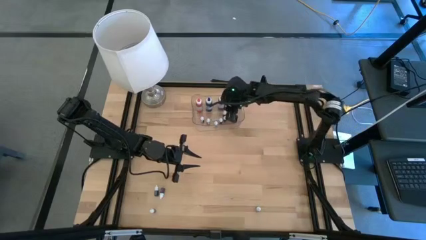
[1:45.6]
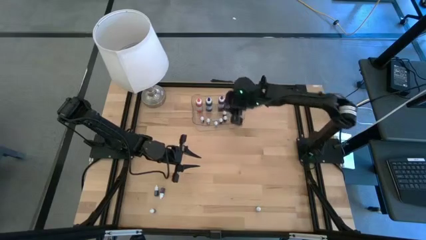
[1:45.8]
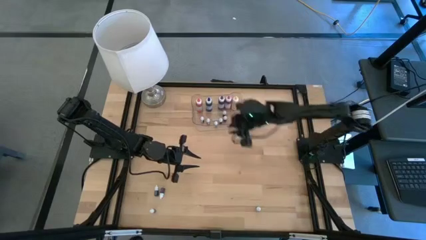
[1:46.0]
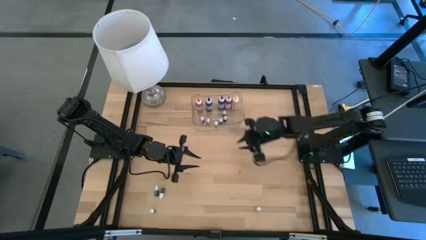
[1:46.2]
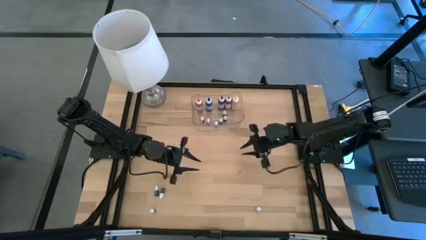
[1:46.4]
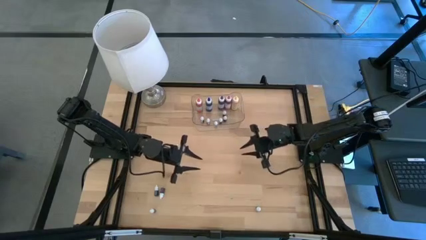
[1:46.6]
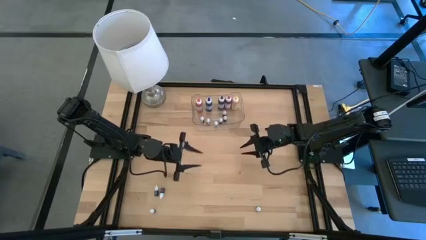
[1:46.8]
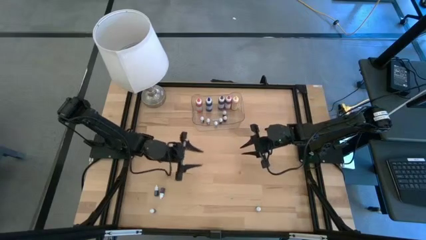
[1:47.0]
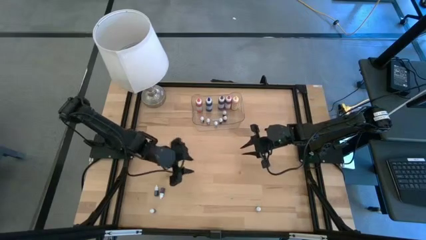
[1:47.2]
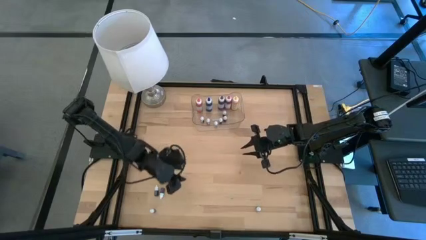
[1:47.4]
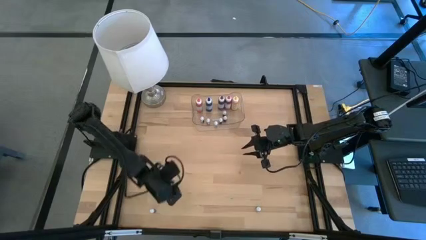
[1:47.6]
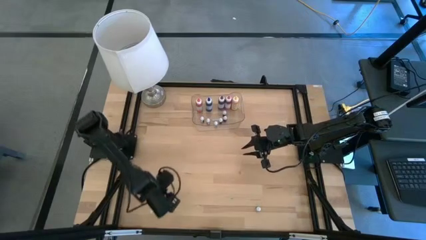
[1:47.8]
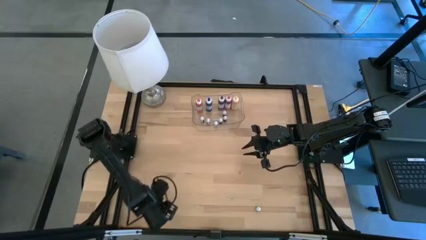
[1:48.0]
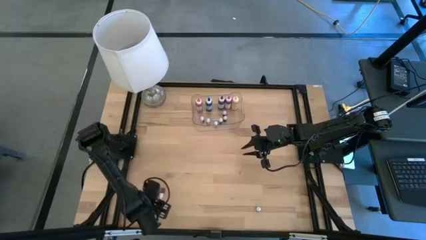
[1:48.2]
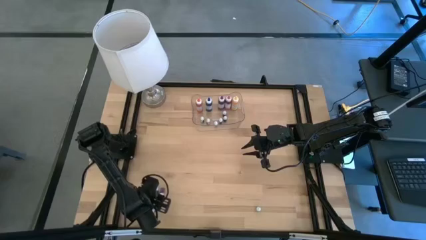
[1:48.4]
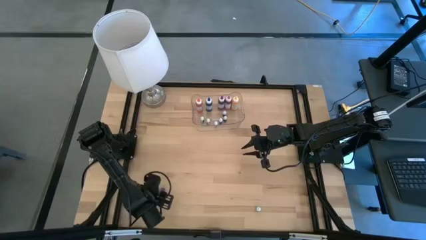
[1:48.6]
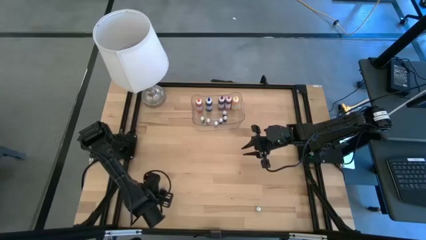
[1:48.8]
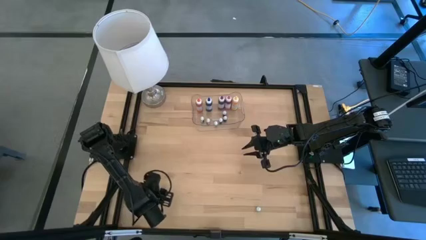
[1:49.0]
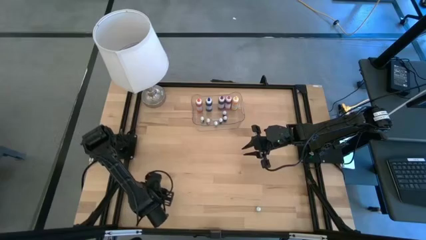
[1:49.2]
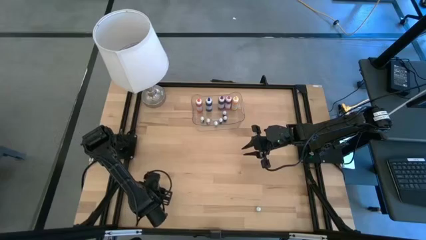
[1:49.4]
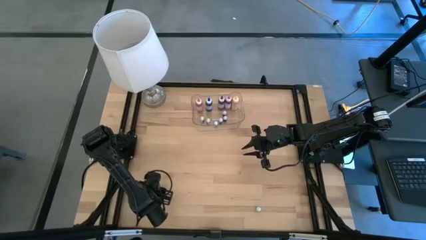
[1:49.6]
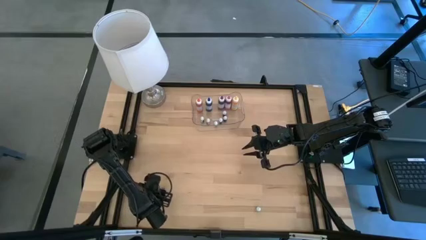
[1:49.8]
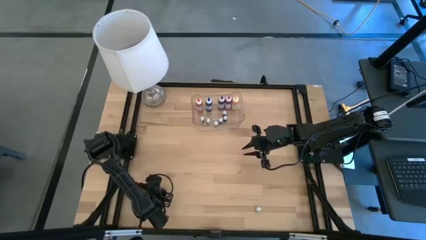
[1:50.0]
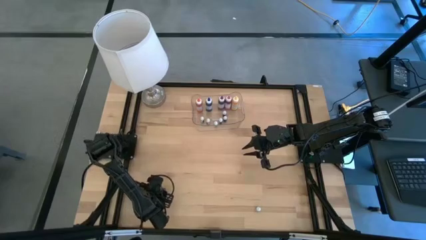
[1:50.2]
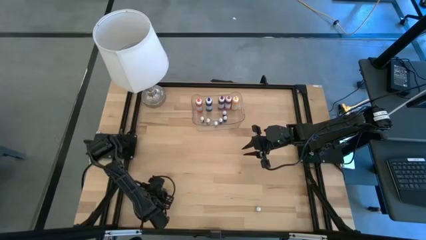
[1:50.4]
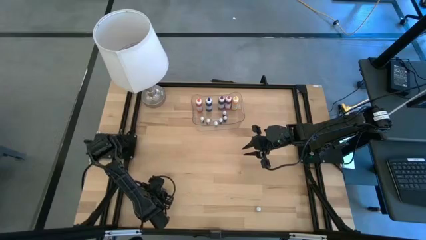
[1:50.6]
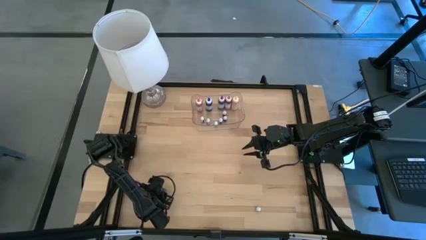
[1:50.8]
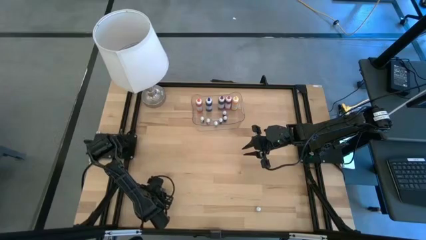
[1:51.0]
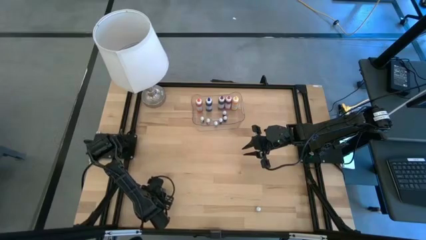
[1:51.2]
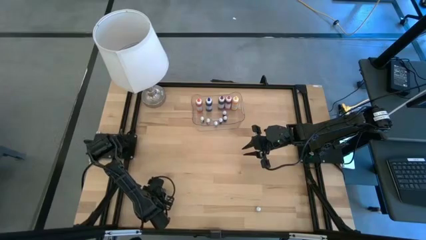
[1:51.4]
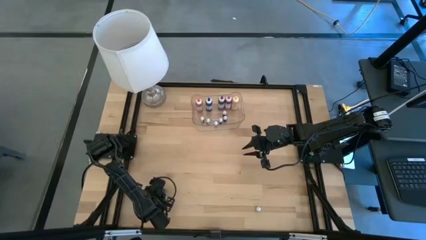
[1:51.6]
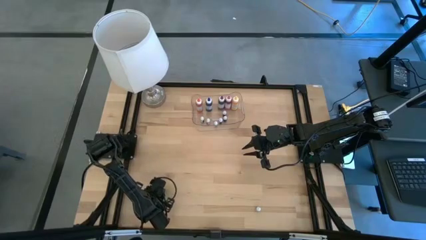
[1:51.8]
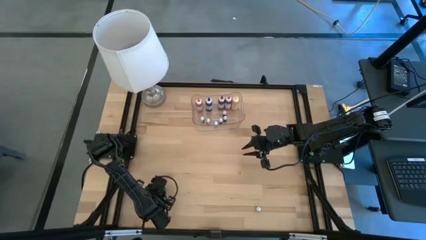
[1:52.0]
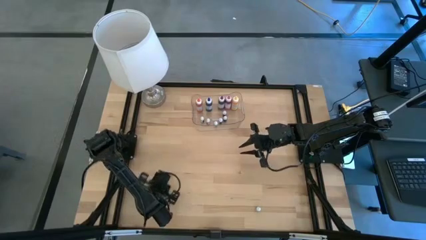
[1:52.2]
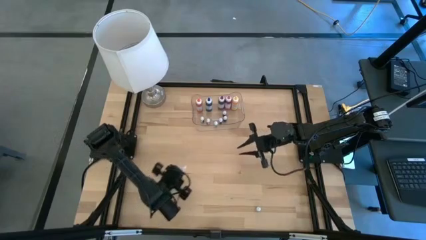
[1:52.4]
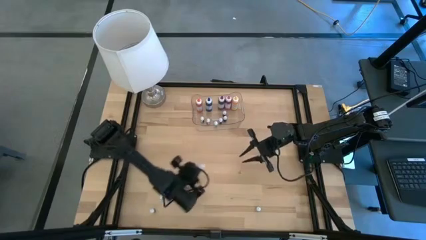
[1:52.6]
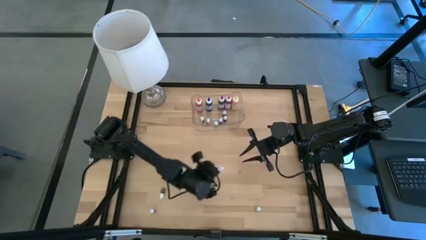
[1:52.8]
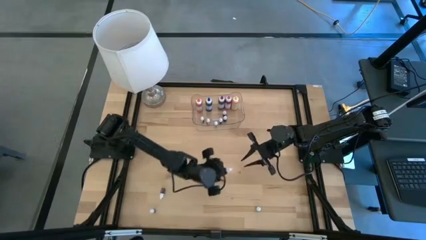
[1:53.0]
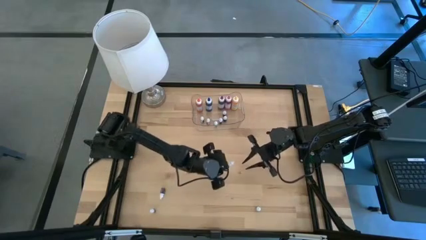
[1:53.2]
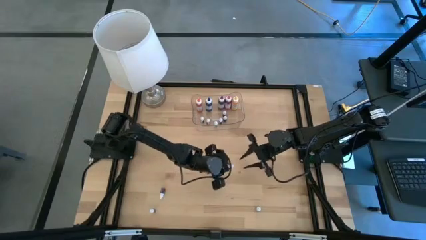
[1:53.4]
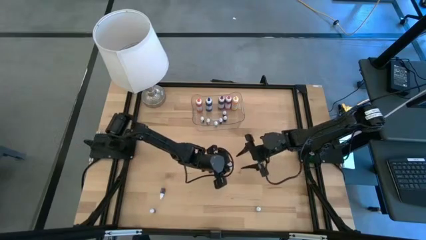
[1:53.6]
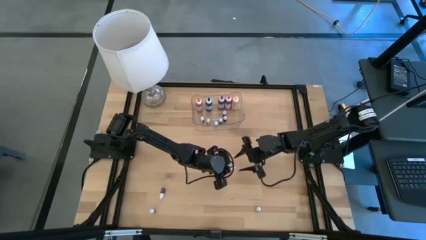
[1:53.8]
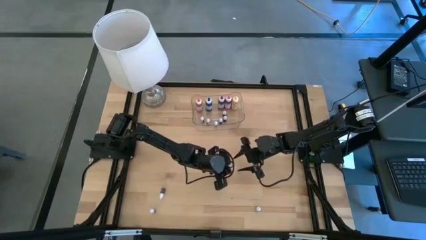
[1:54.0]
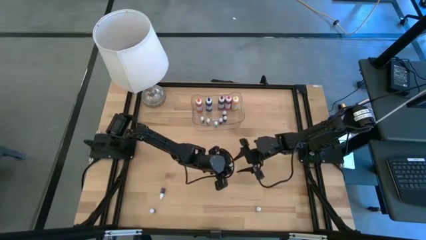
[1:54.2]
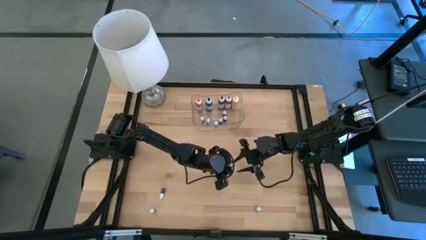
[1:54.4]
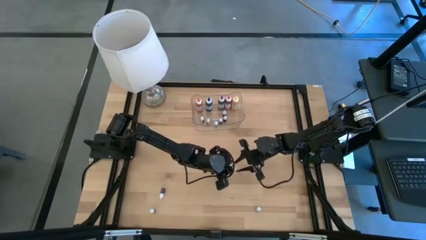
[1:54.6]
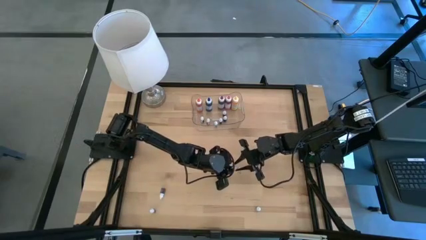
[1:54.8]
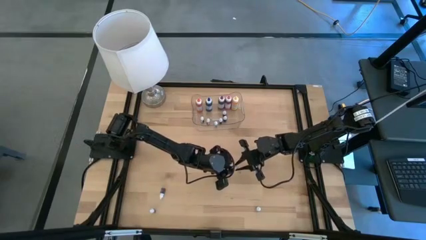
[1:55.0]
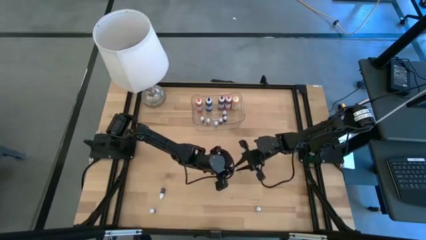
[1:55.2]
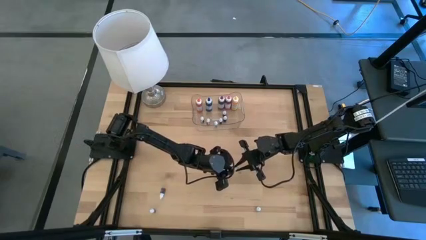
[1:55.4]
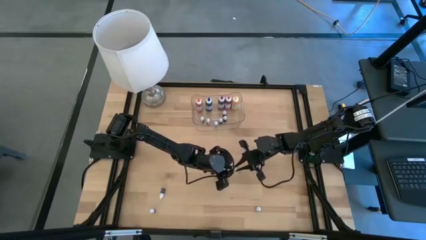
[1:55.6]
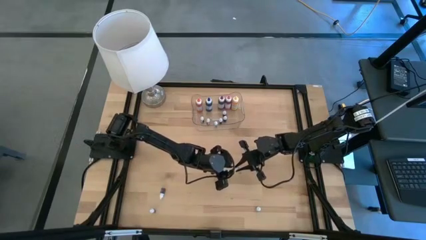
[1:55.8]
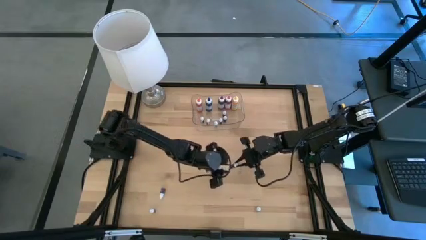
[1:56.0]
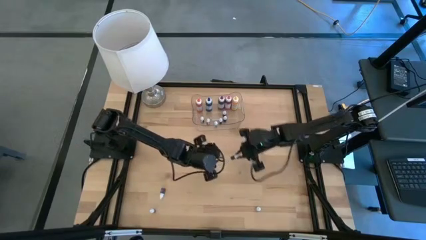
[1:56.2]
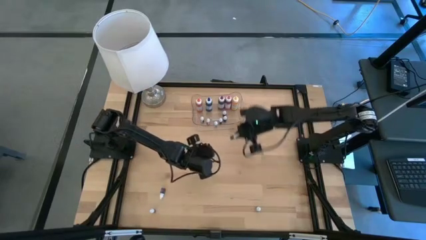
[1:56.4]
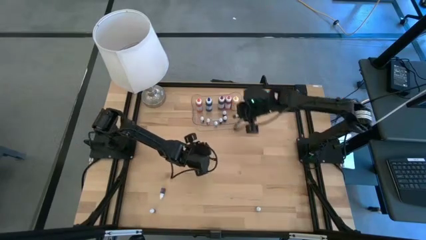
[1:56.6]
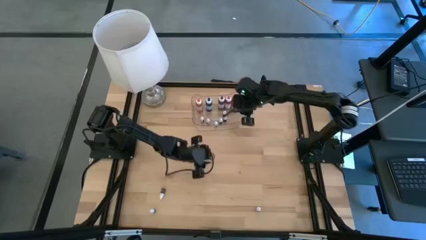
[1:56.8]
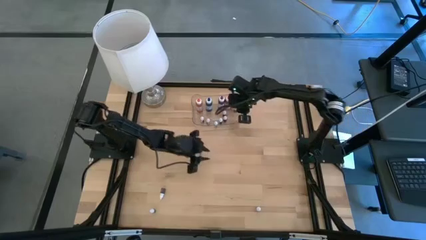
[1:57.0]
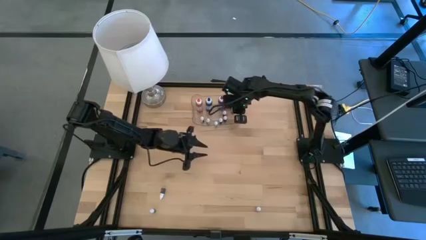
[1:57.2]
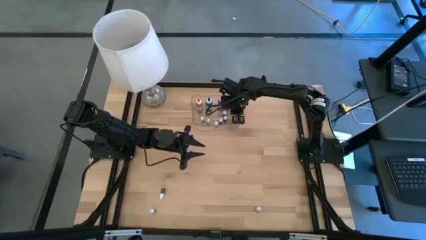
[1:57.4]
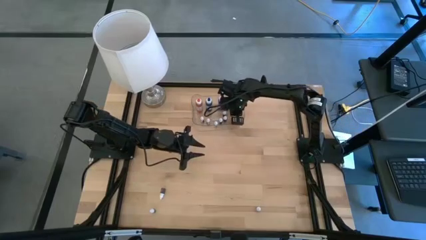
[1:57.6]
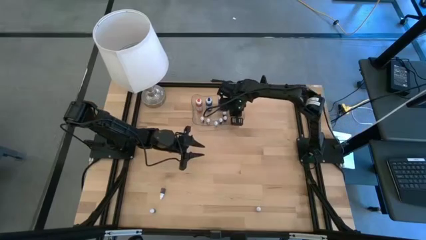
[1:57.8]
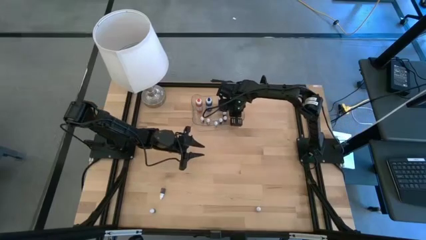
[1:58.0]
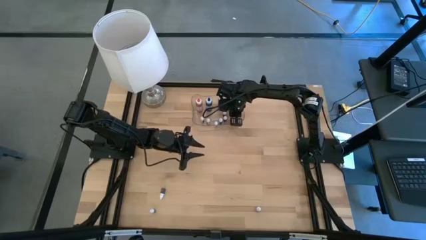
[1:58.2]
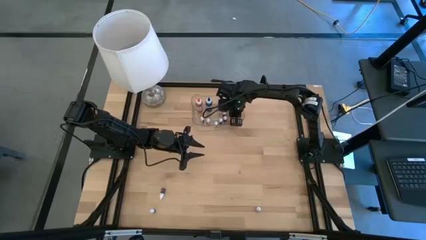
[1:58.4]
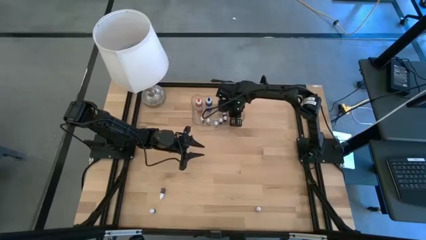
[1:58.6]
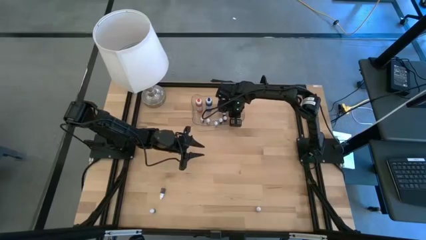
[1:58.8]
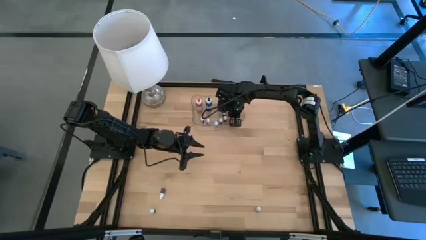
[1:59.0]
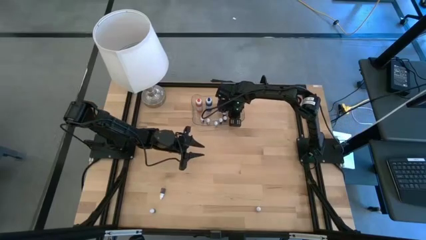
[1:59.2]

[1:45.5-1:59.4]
Task: Pick & Place food coloring
Put the small green food coloring bottle into the transparent bin

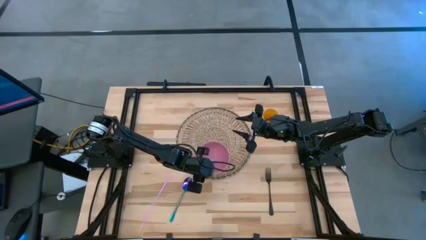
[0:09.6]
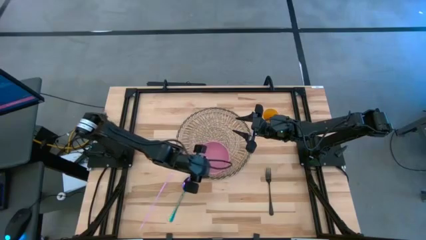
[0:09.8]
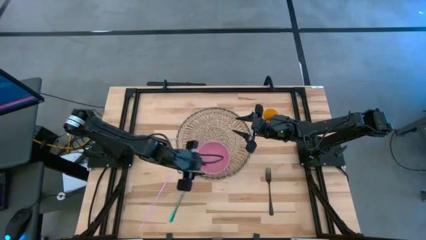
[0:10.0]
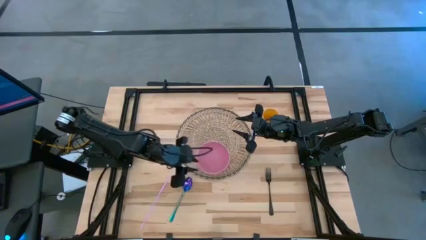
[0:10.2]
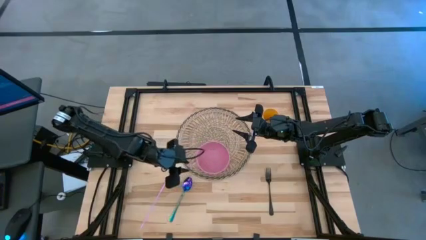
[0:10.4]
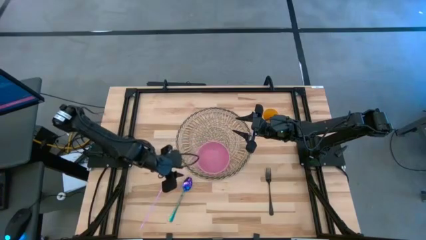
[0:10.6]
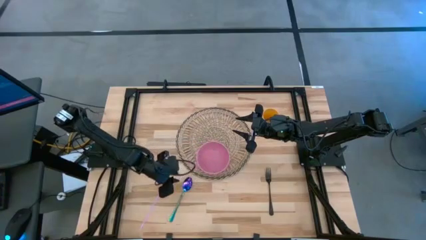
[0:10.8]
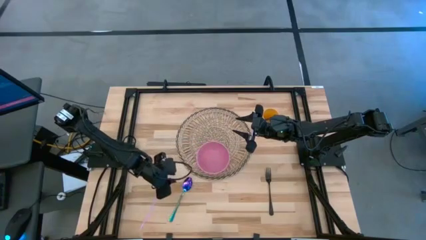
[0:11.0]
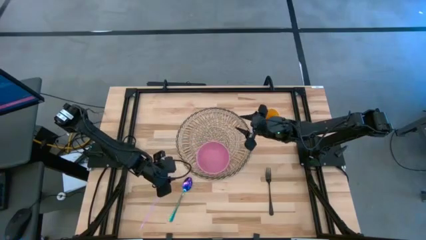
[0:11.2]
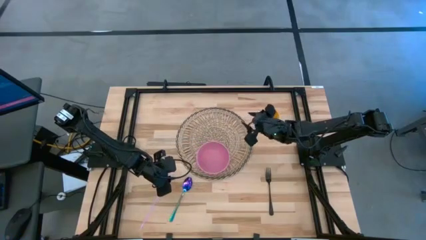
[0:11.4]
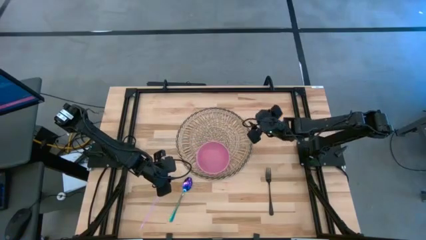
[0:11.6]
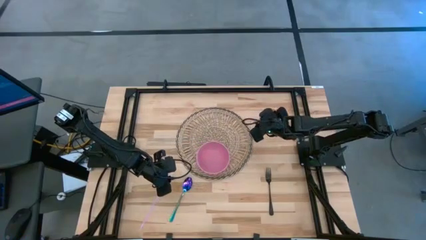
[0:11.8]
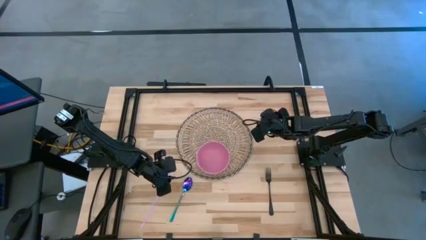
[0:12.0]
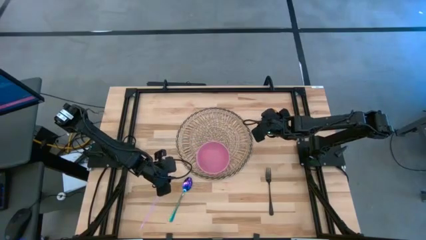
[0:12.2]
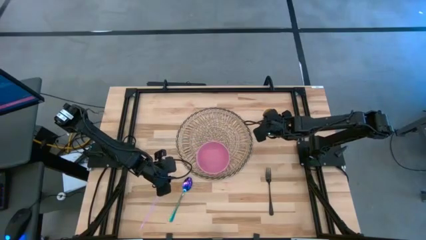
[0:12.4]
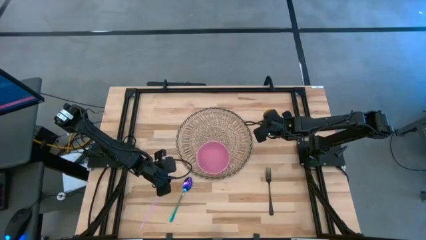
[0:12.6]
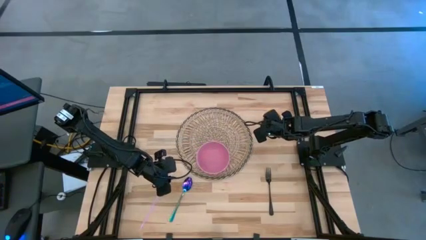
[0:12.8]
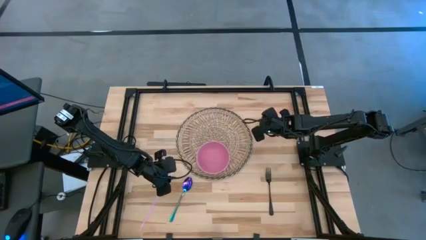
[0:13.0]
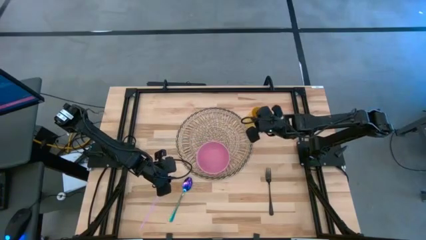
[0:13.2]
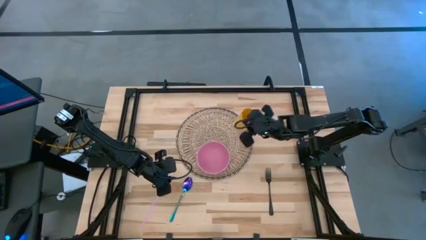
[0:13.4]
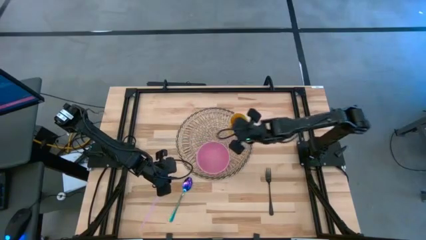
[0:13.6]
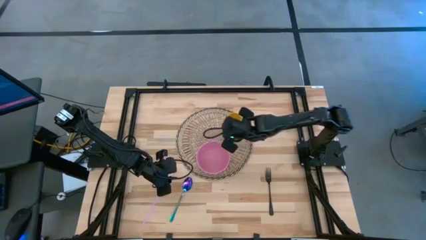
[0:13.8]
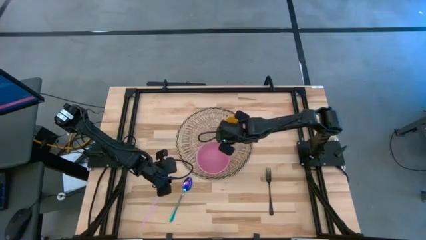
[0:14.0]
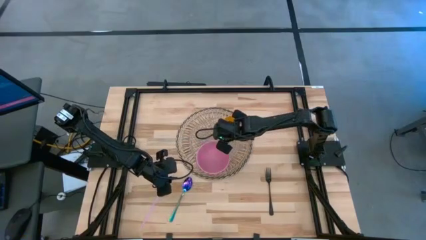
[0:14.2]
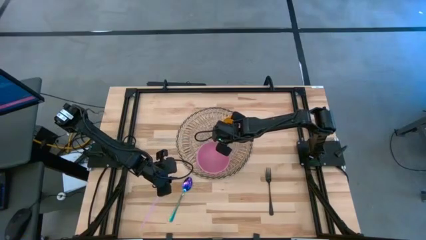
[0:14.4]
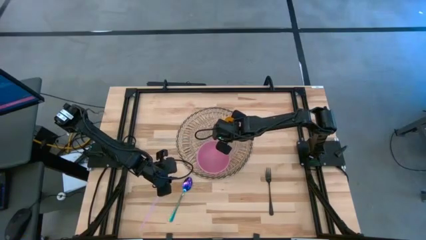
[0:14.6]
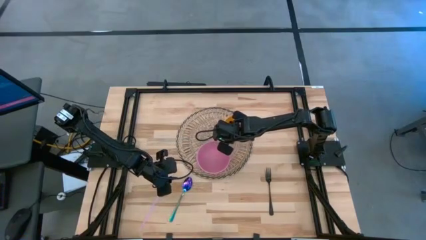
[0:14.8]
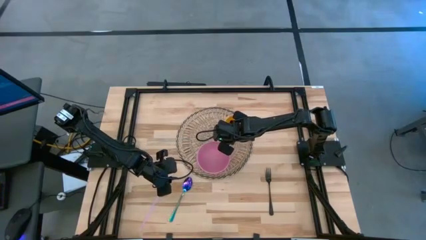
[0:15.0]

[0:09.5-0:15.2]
Task: Pick & Place Utensil
Put the yellow cup on the brown mat to the top right of the pink bowl
